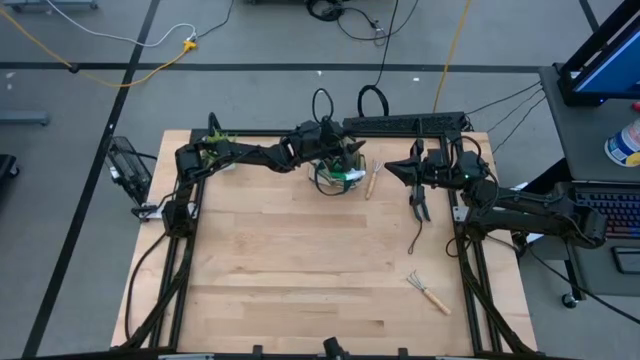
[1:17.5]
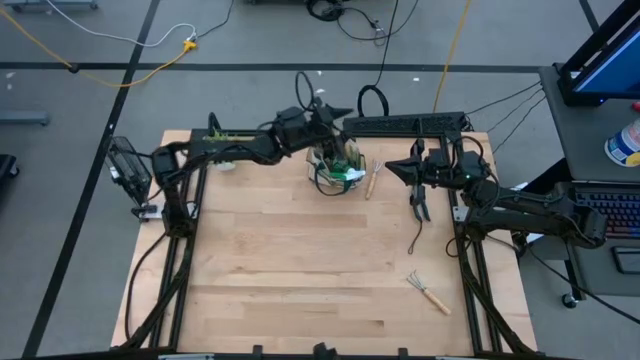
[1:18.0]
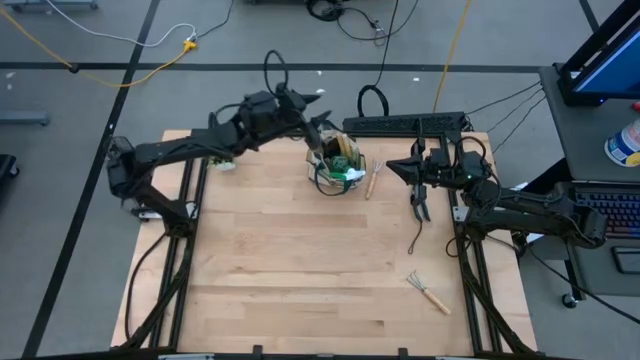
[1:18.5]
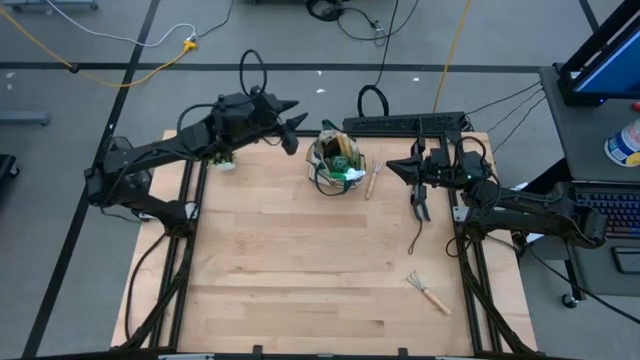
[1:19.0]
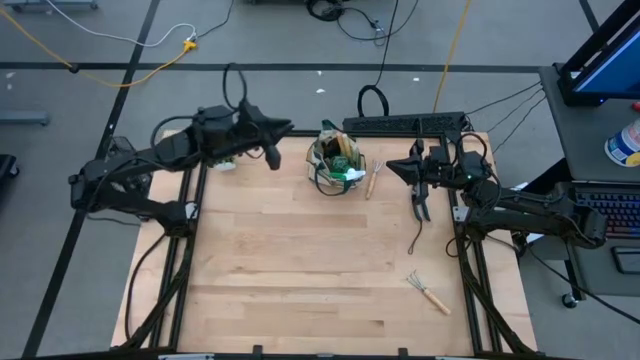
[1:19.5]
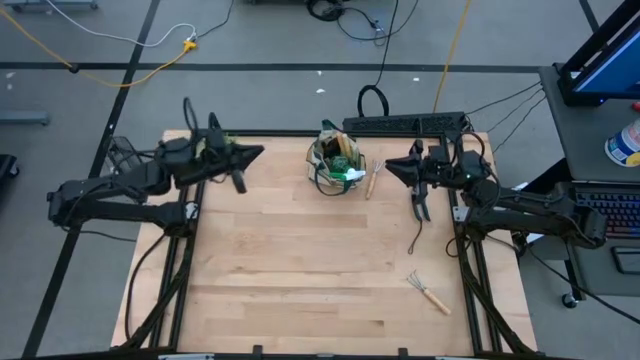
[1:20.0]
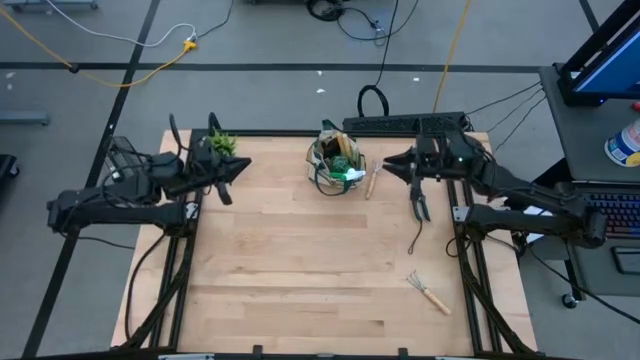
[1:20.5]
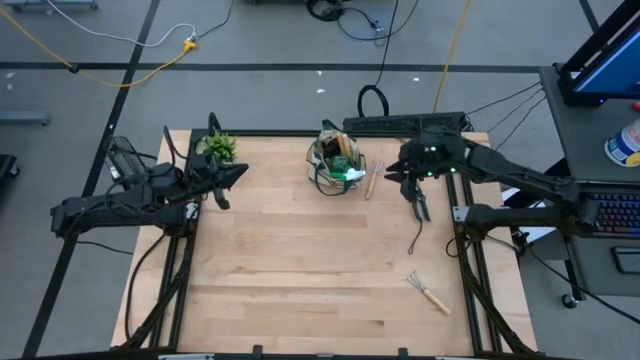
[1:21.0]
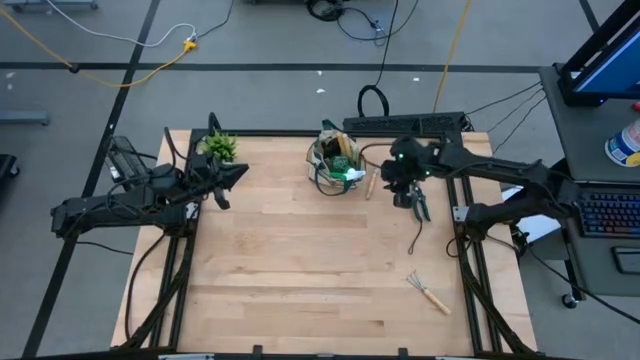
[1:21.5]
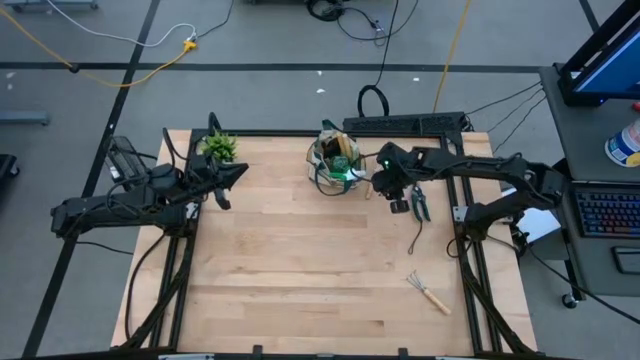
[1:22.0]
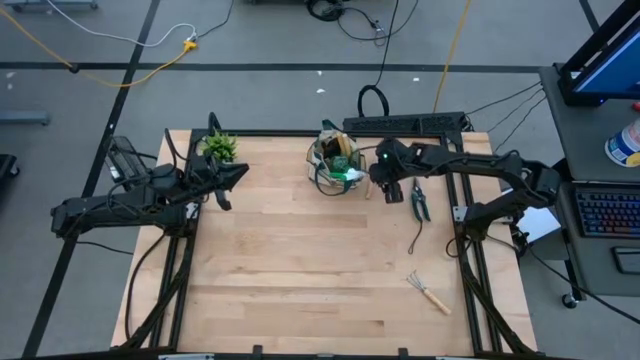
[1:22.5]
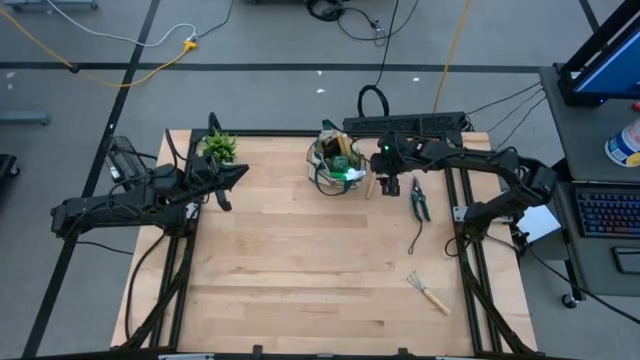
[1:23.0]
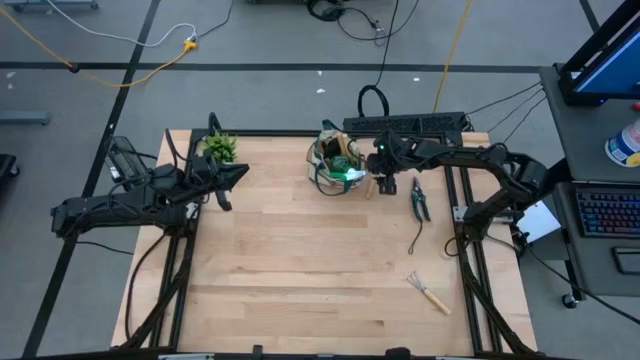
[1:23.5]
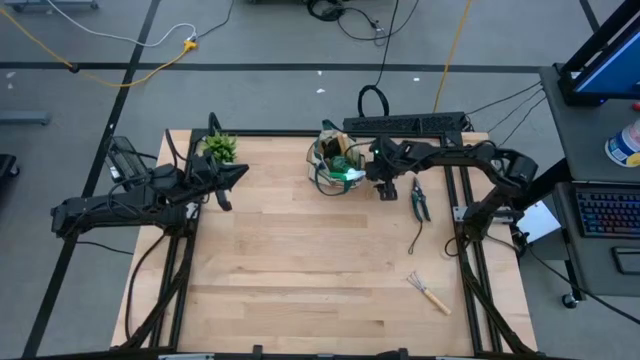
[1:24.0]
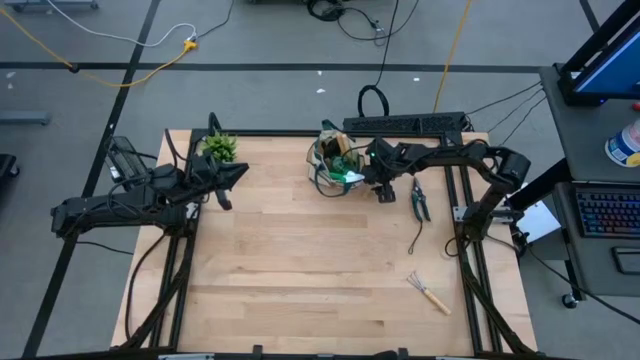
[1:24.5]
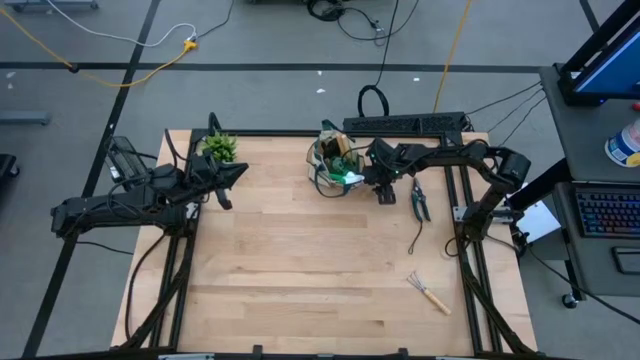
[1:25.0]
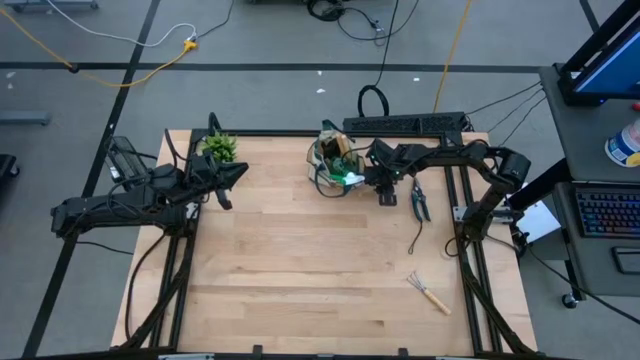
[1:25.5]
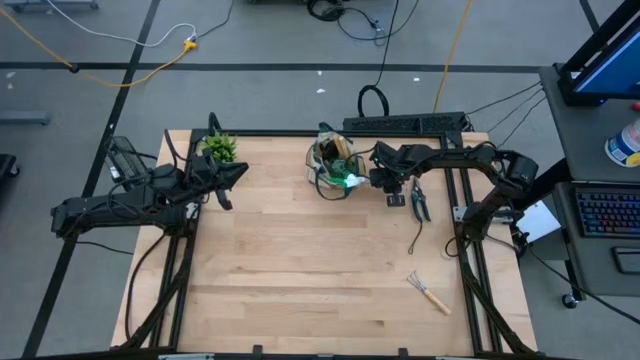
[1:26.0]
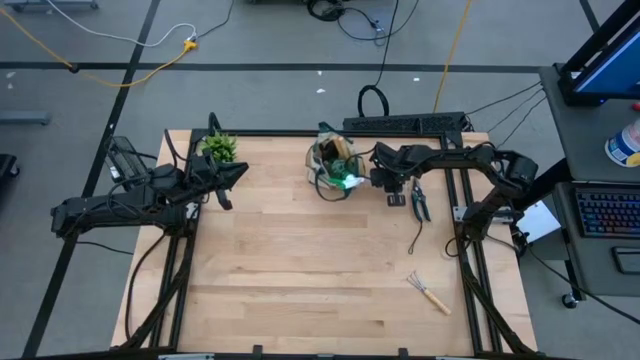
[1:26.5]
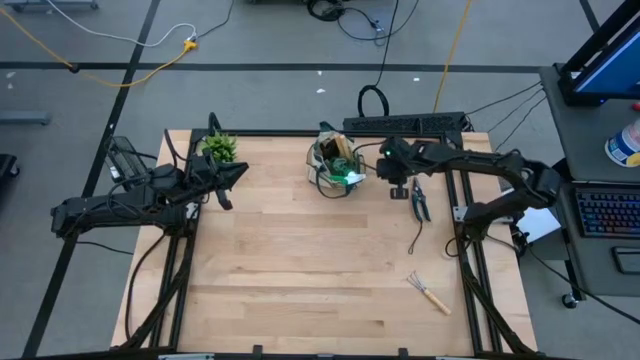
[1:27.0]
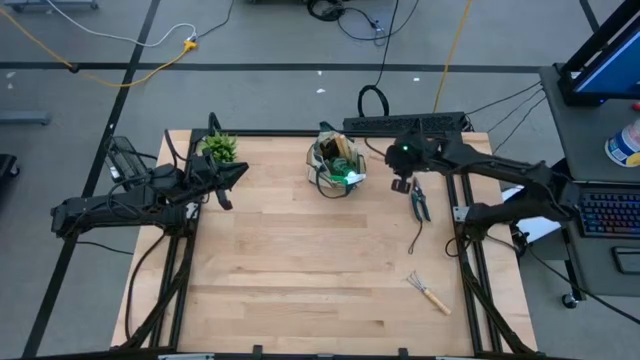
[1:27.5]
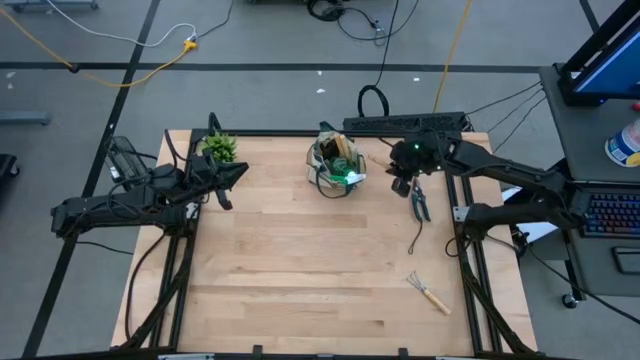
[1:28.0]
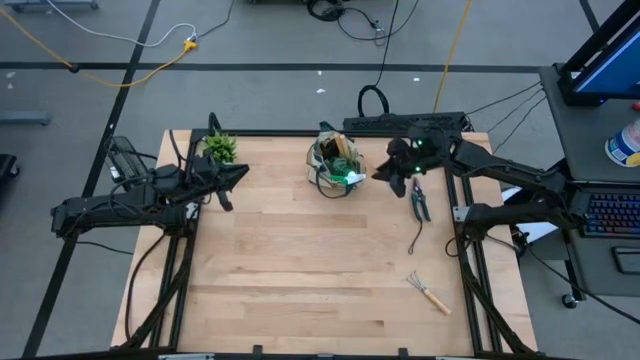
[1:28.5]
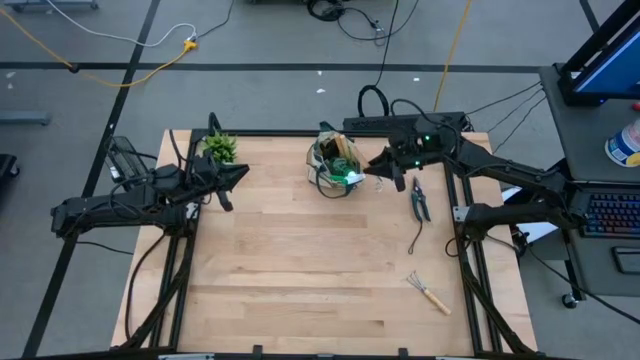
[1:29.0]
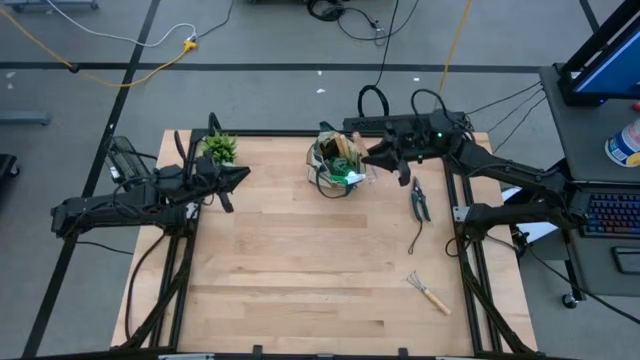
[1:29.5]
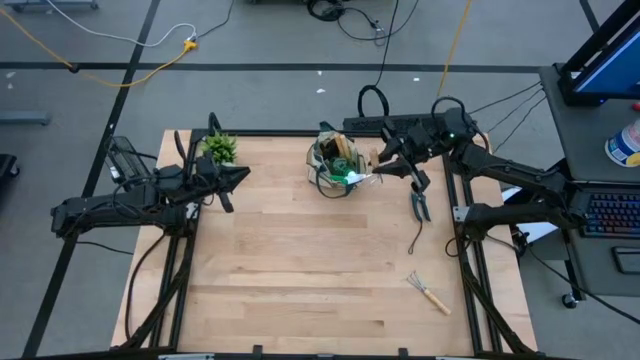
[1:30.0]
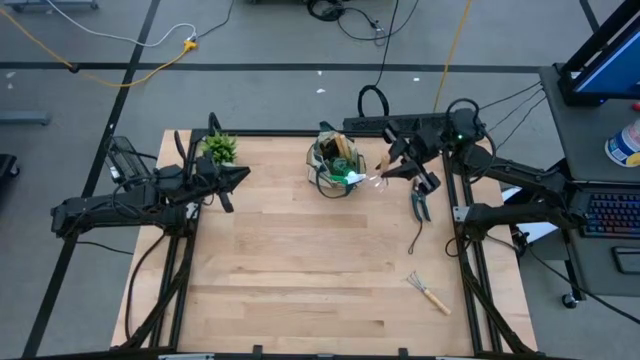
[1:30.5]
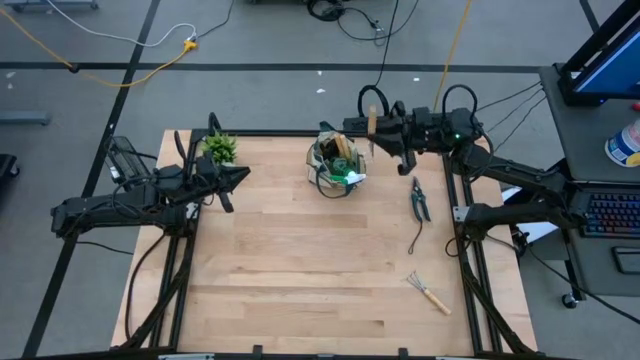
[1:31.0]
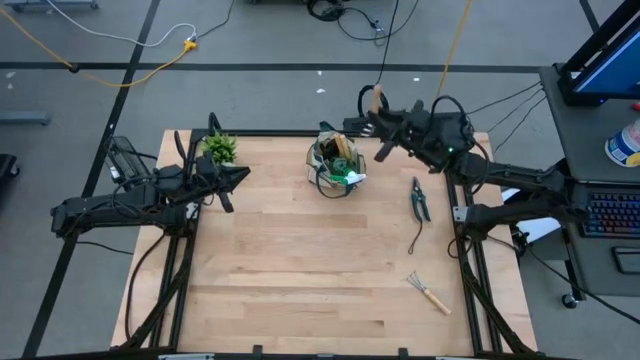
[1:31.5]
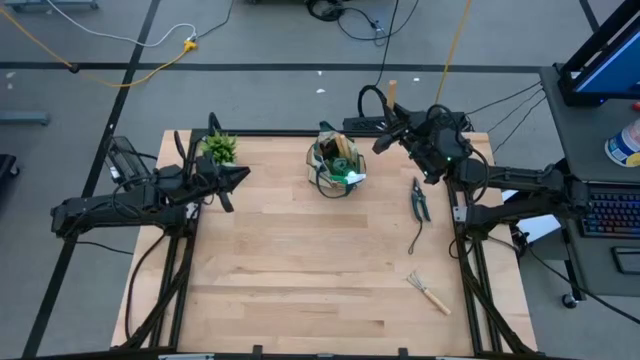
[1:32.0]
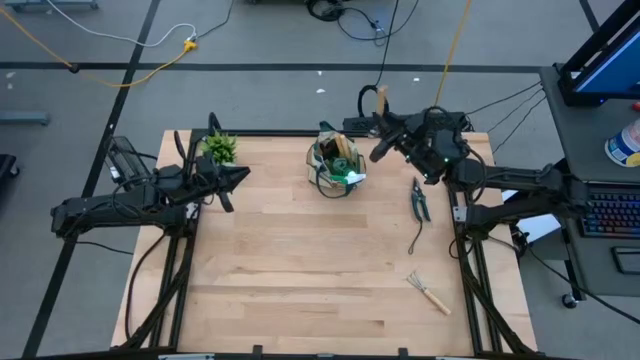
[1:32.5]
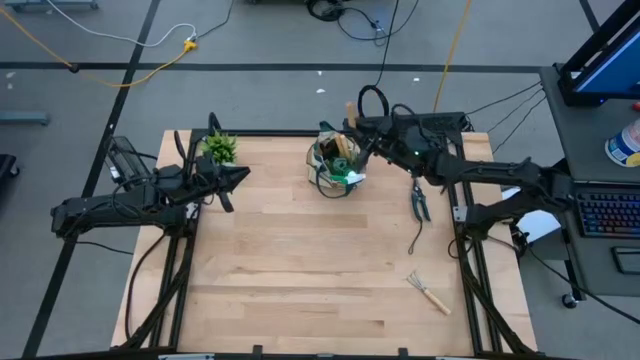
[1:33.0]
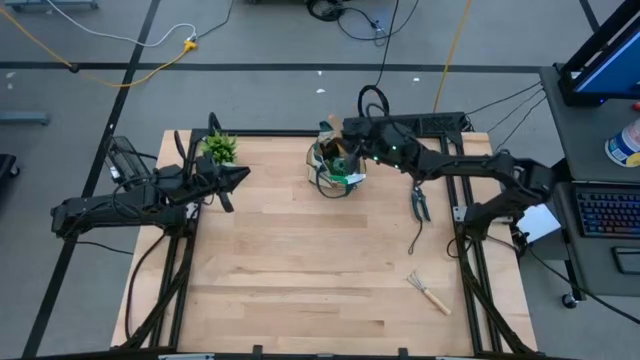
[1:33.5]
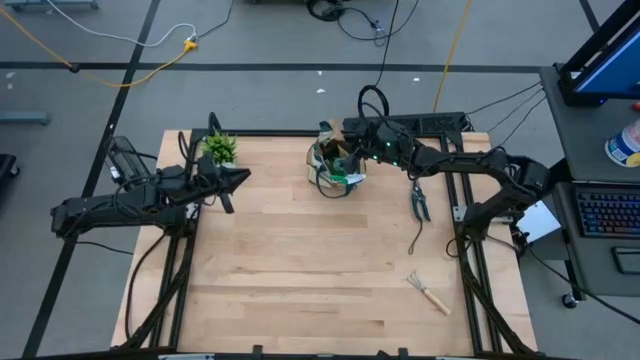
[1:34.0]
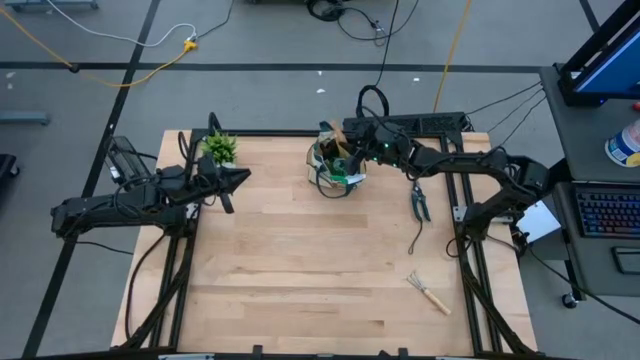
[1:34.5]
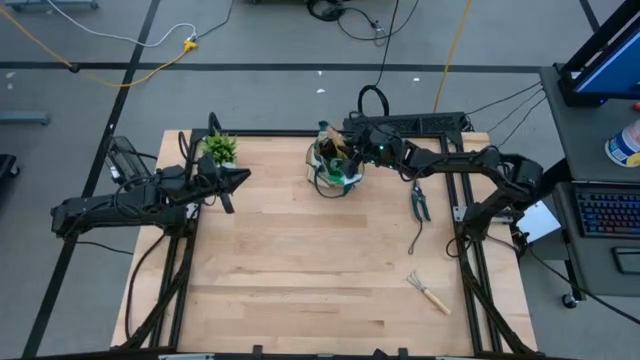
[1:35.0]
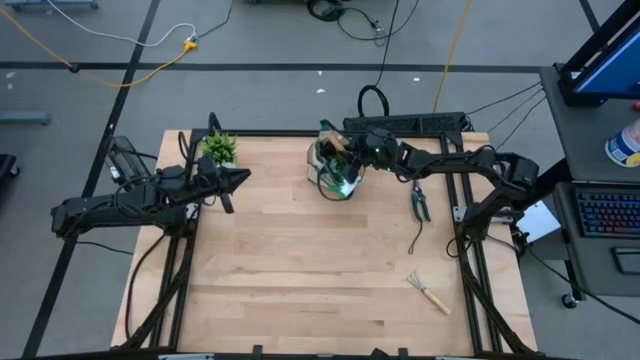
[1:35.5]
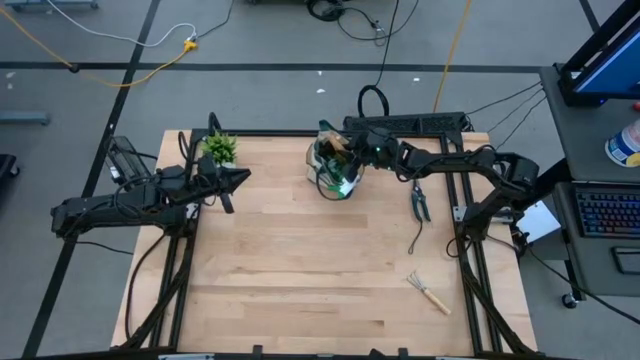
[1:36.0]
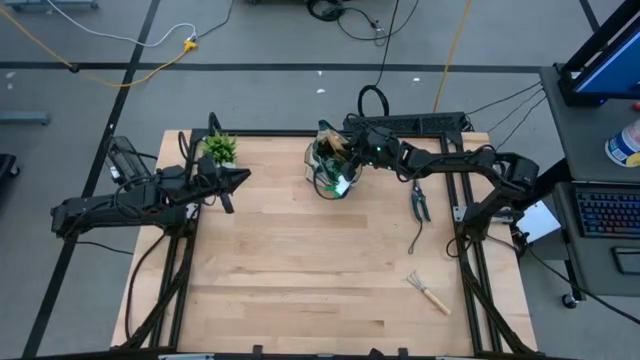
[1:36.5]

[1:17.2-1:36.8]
Task: Pick & Place Garden tools in Gardening bag
Put the top brown hand rake into the gardening bag

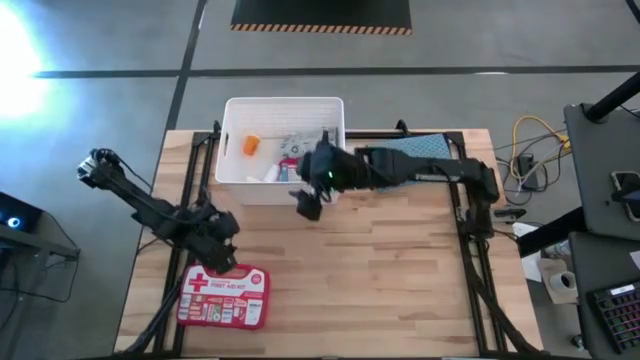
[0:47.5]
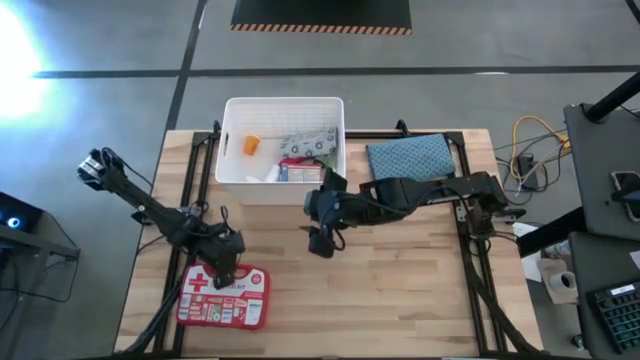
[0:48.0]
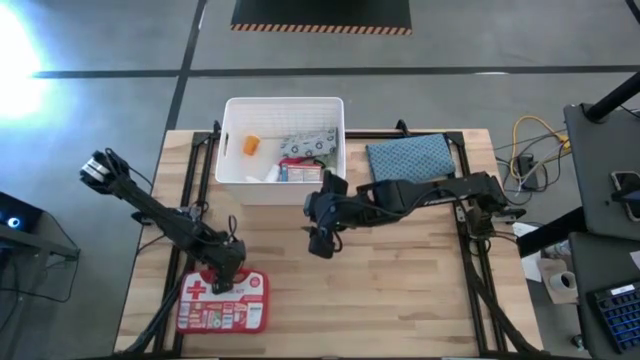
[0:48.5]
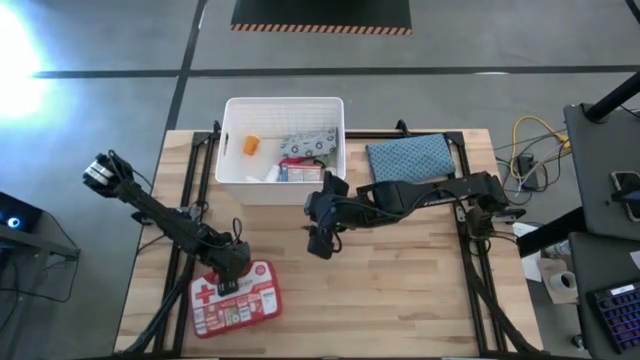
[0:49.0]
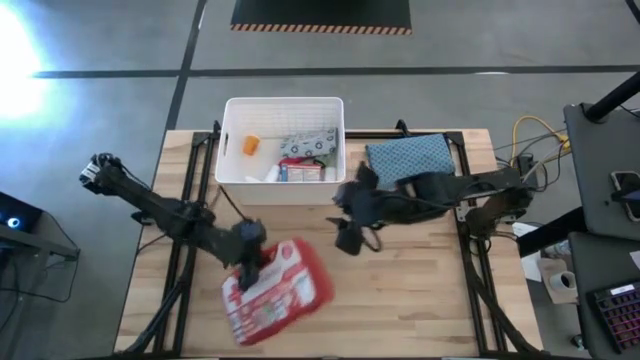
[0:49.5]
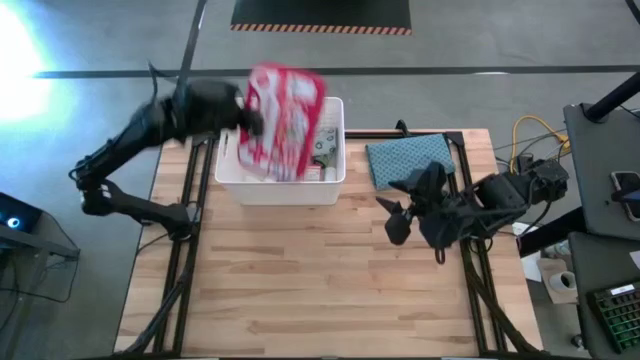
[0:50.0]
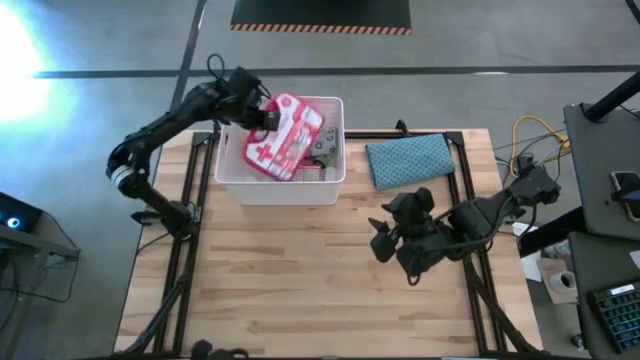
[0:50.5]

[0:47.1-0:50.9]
Task: Pick & place medical supplies in basket/bin
Put the red first aid kit into the white bin
